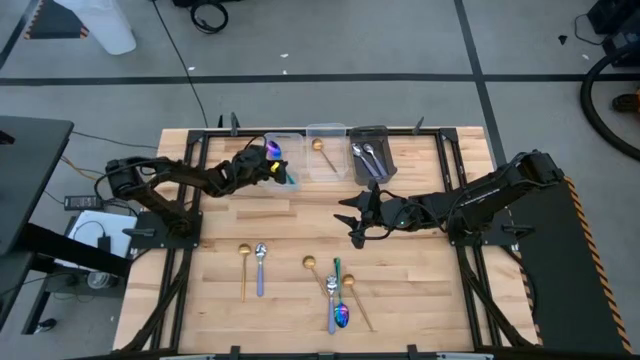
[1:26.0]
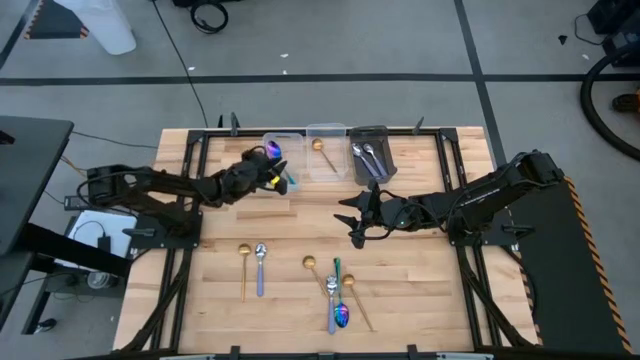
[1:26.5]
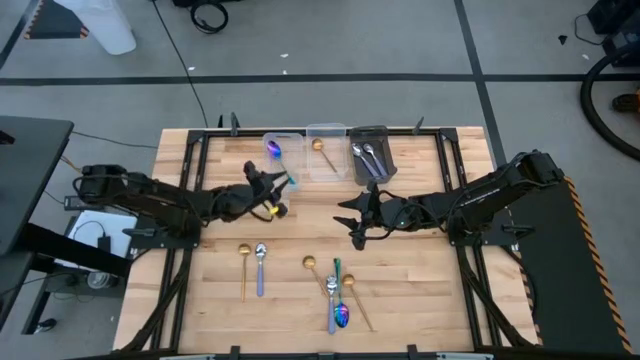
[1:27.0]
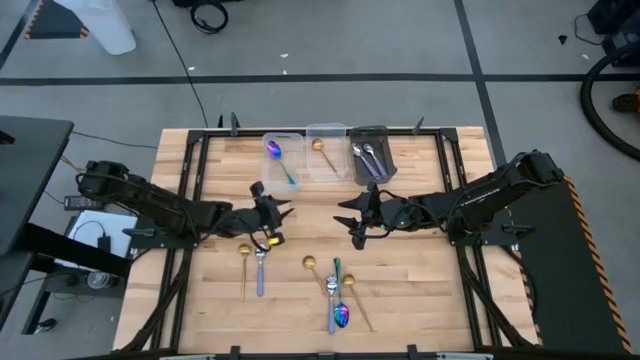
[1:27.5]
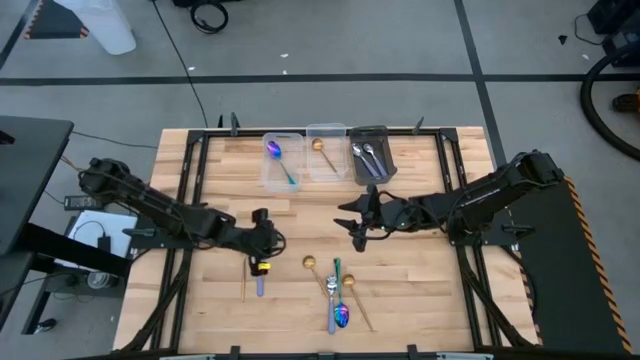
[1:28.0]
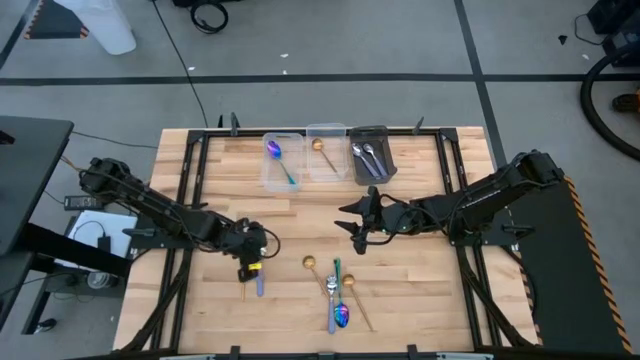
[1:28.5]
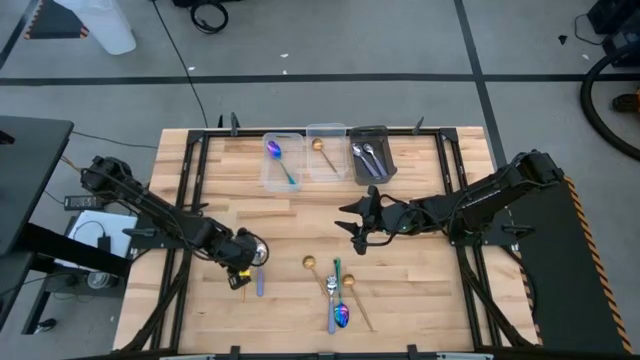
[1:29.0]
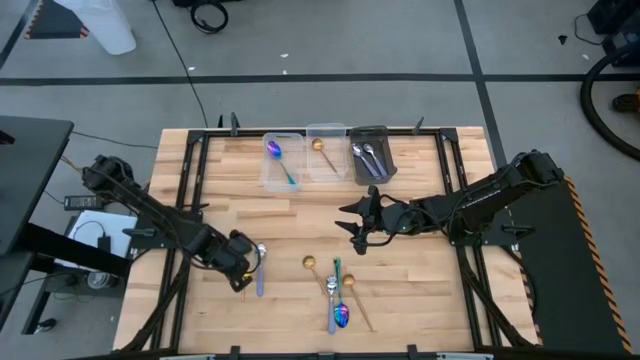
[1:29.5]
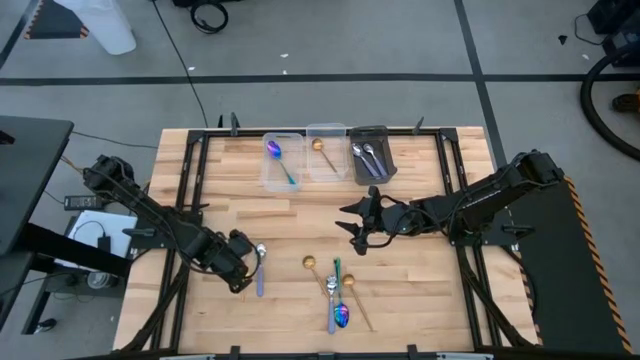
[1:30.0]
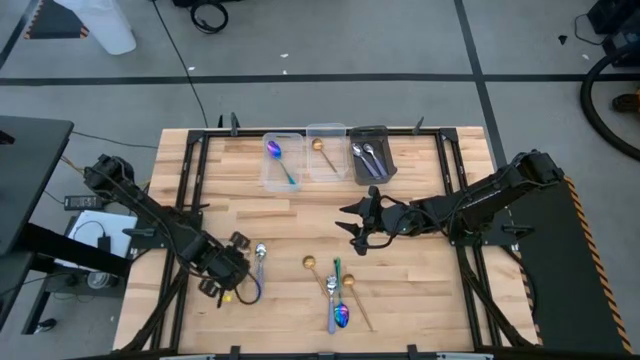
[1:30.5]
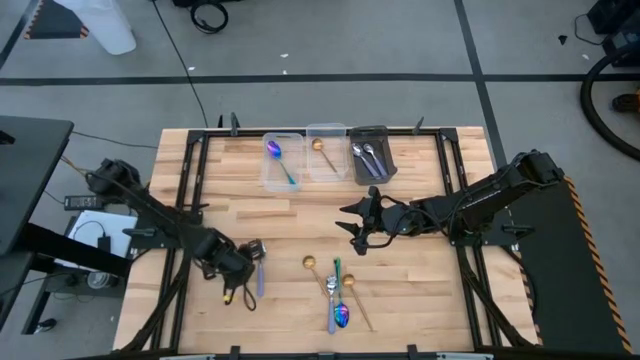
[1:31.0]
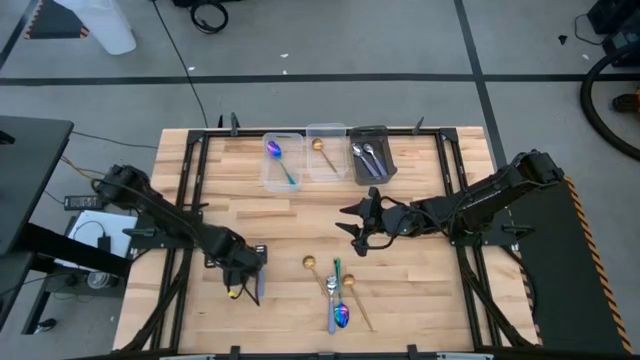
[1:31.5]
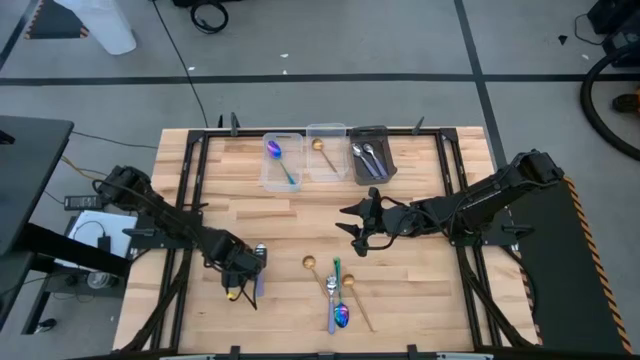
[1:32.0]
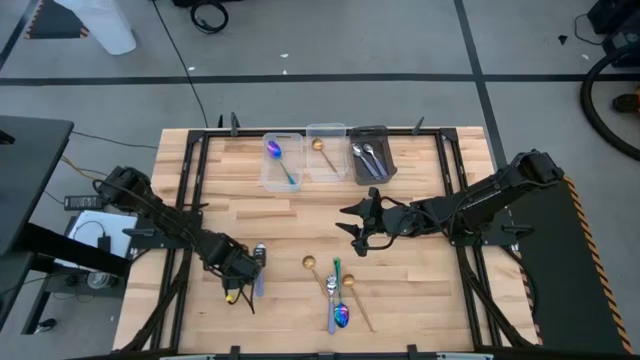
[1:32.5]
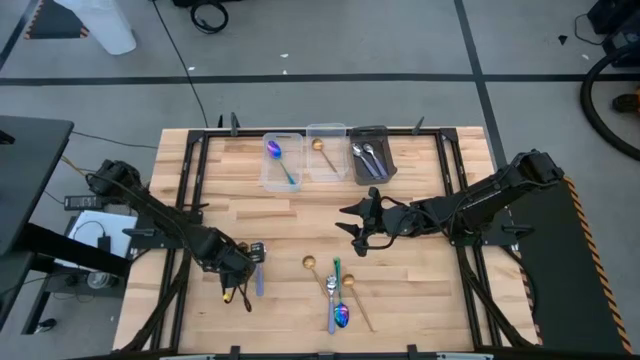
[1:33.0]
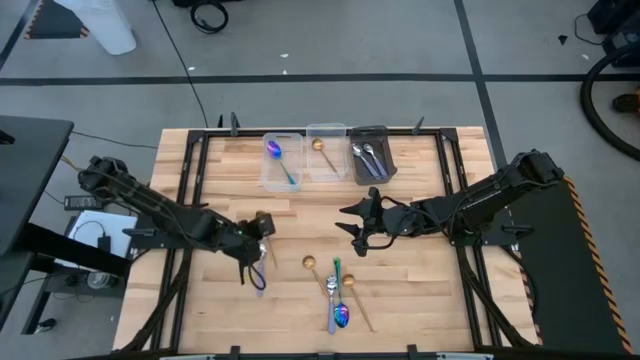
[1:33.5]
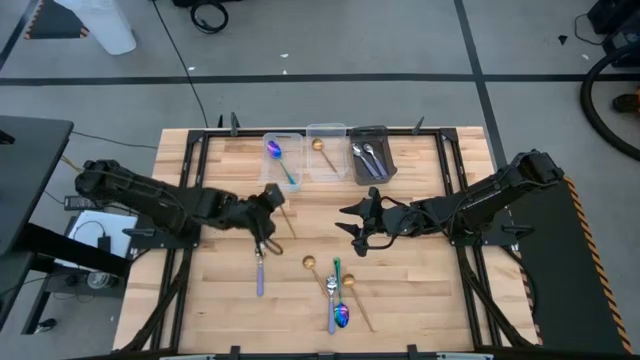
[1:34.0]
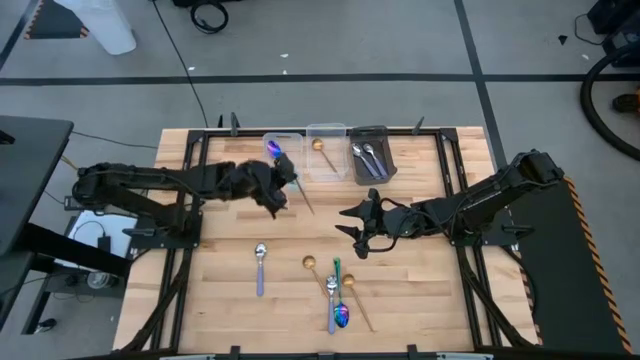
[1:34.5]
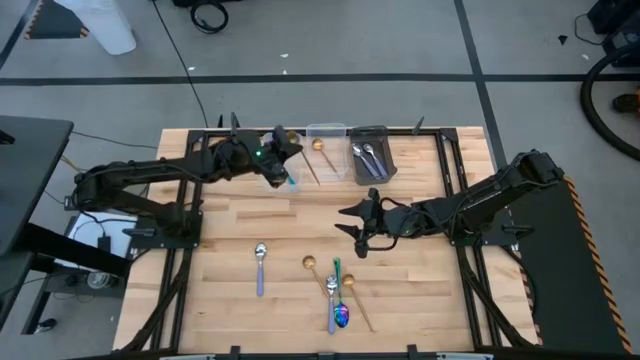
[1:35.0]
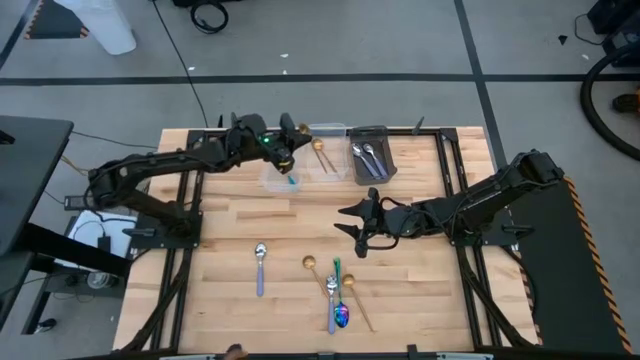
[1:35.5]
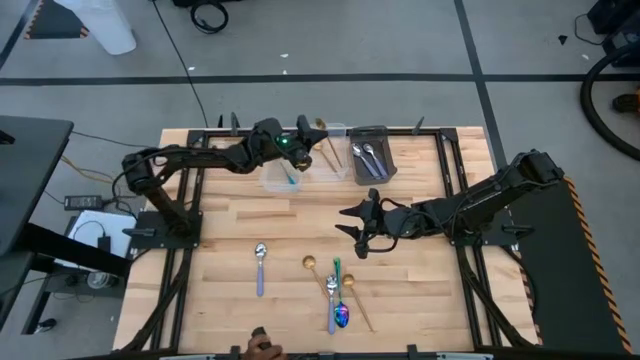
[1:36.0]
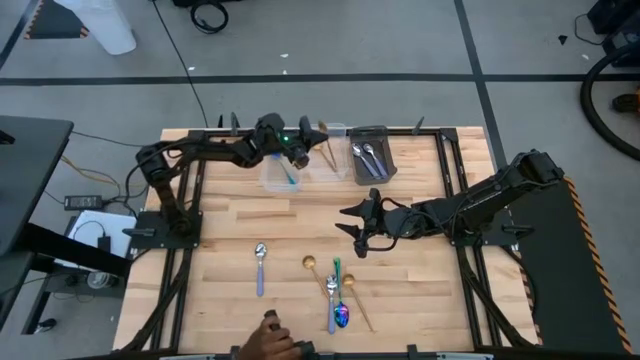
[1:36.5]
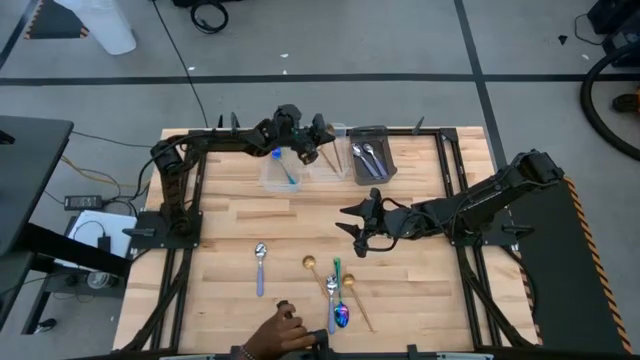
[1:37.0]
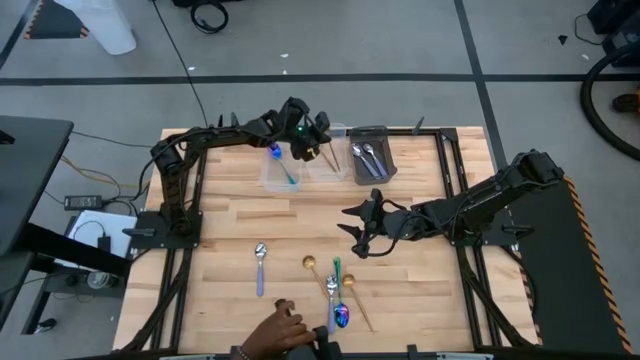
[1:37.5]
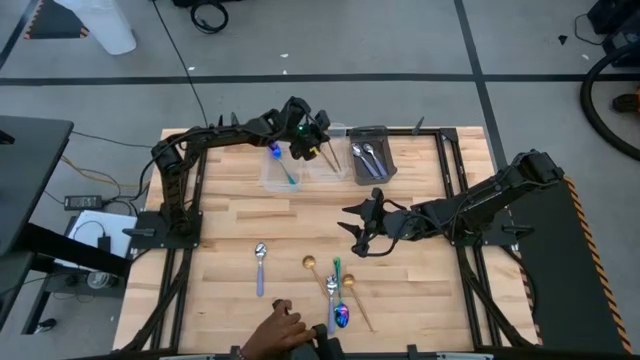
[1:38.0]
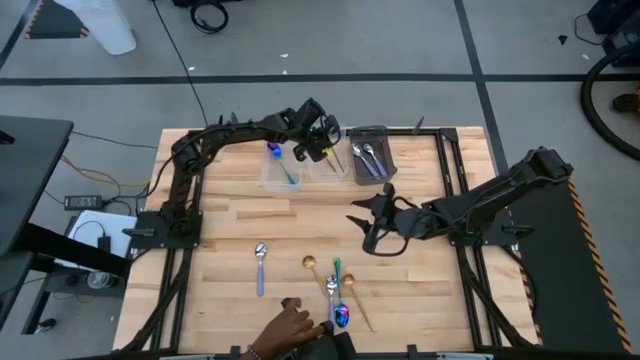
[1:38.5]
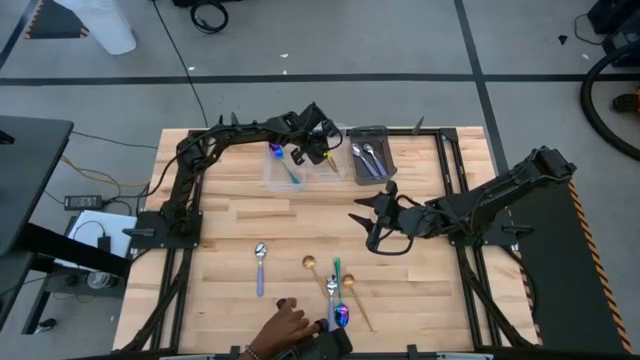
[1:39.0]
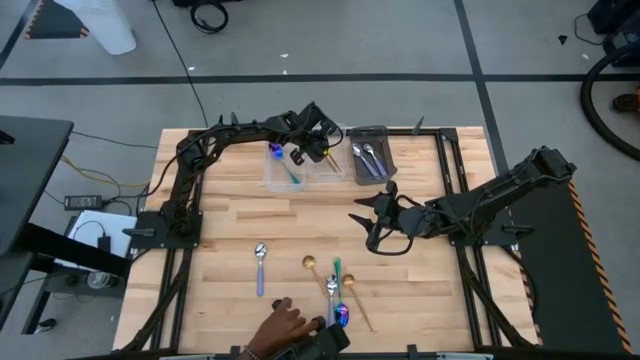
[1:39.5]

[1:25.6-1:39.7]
Task: Sort silverware by color (type)
Put the gold spoon into the right transparent bin

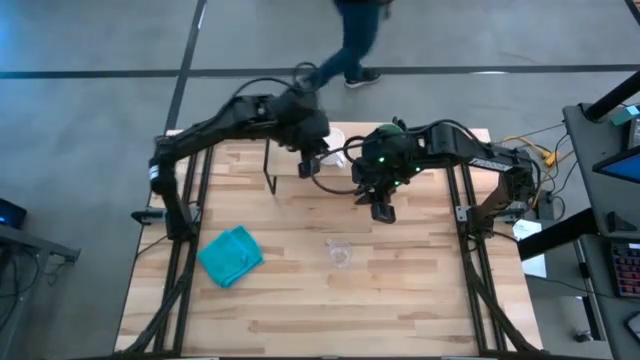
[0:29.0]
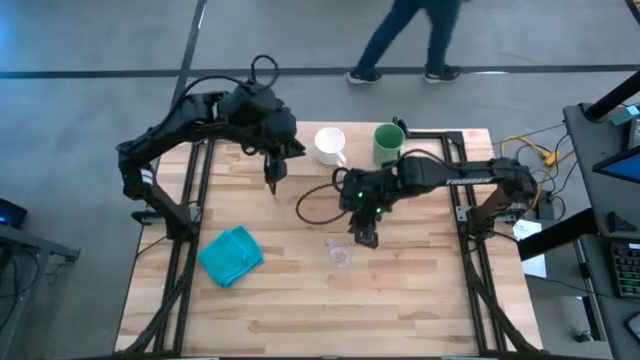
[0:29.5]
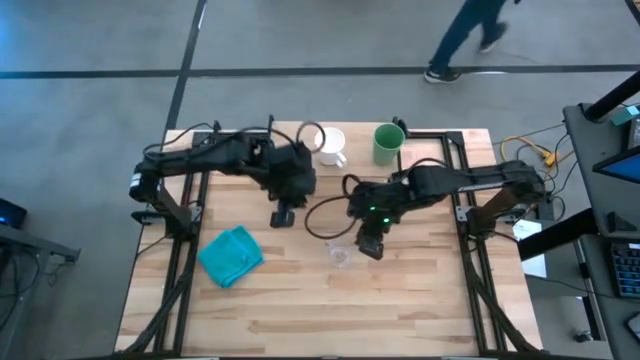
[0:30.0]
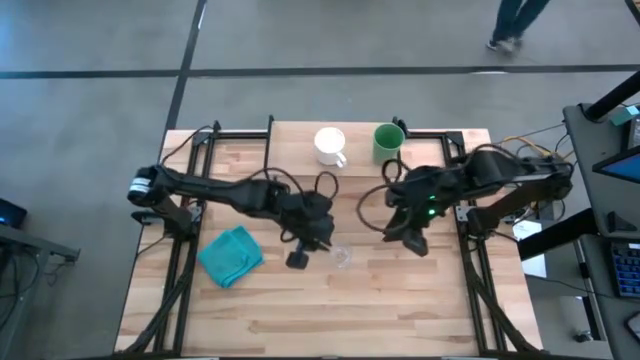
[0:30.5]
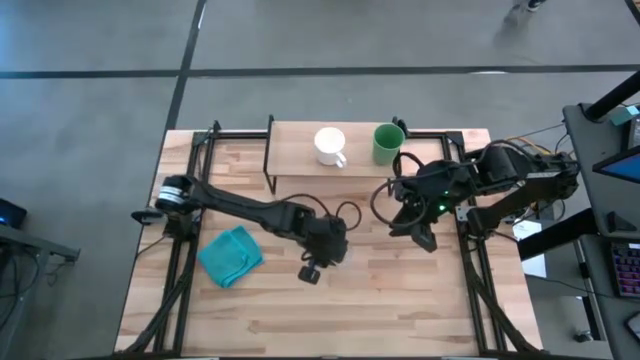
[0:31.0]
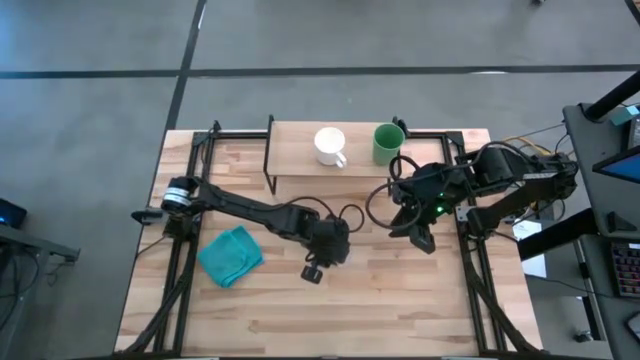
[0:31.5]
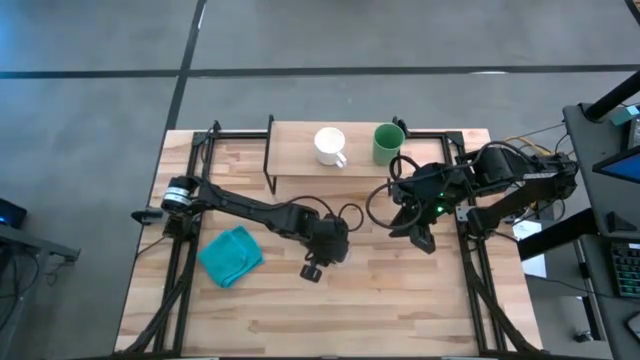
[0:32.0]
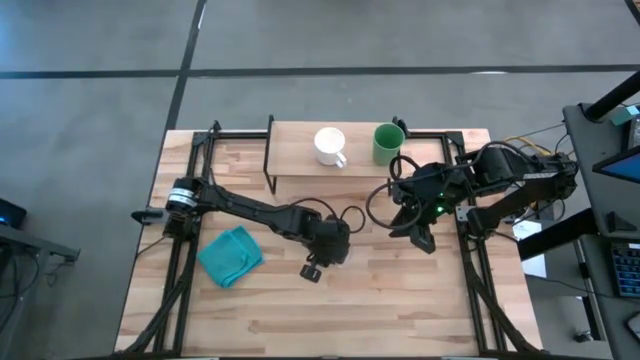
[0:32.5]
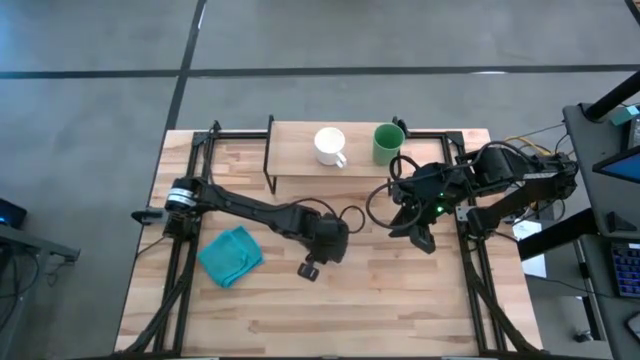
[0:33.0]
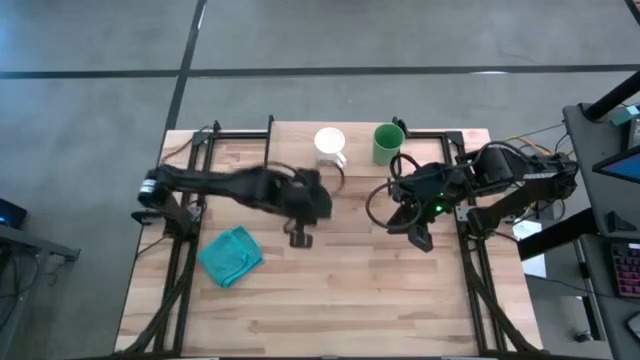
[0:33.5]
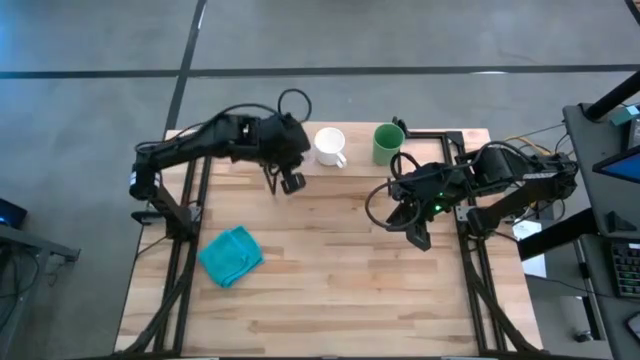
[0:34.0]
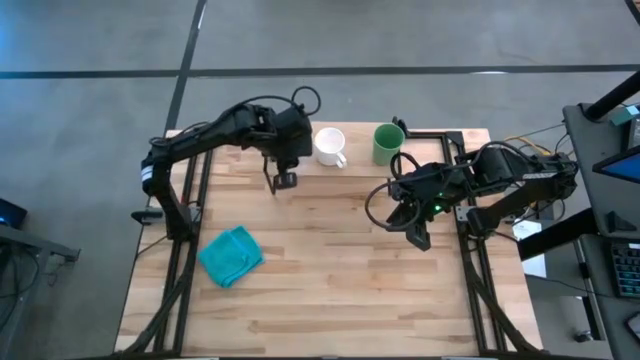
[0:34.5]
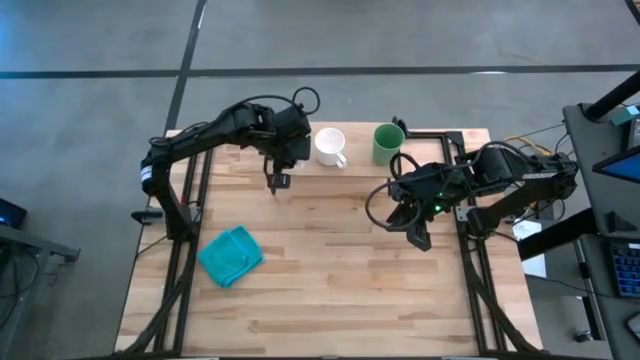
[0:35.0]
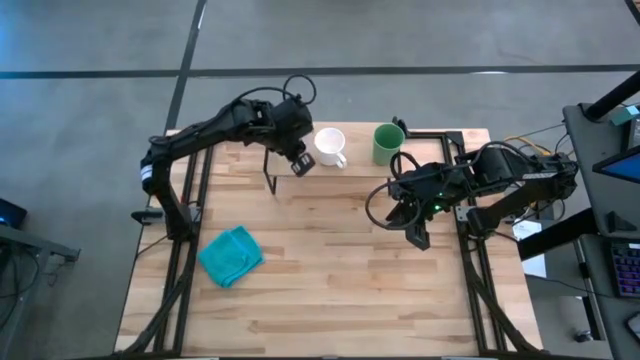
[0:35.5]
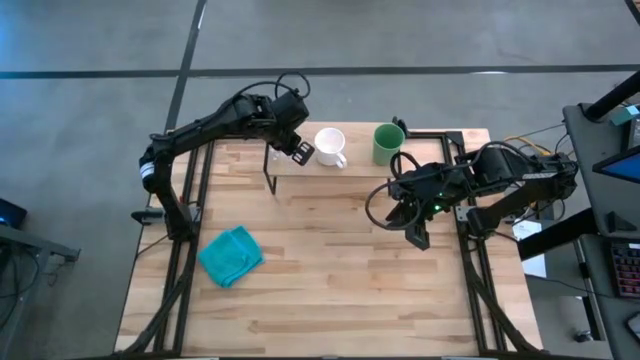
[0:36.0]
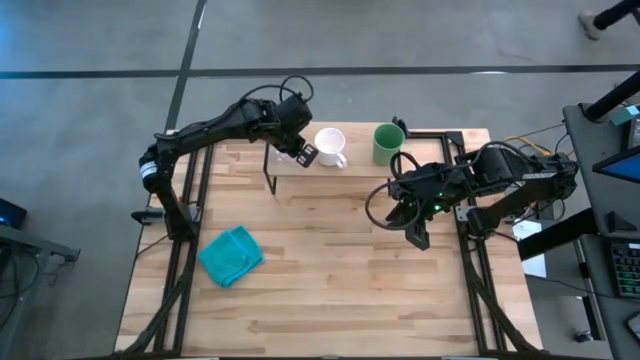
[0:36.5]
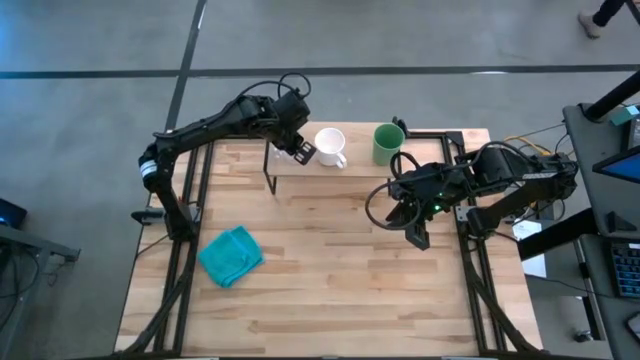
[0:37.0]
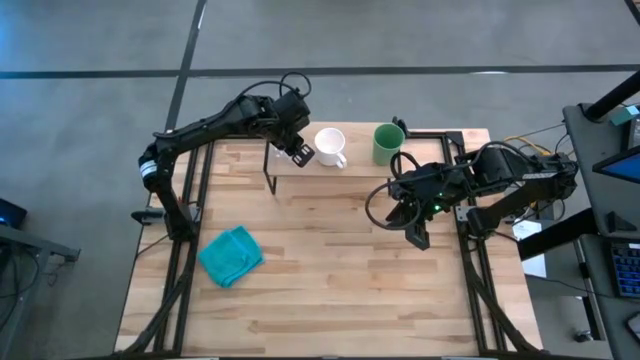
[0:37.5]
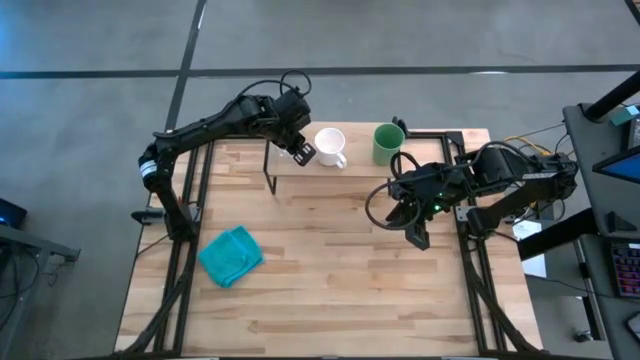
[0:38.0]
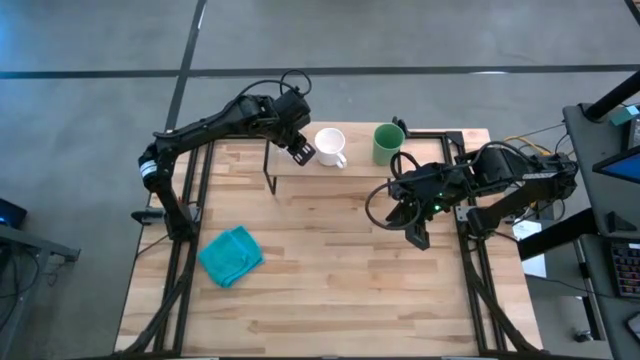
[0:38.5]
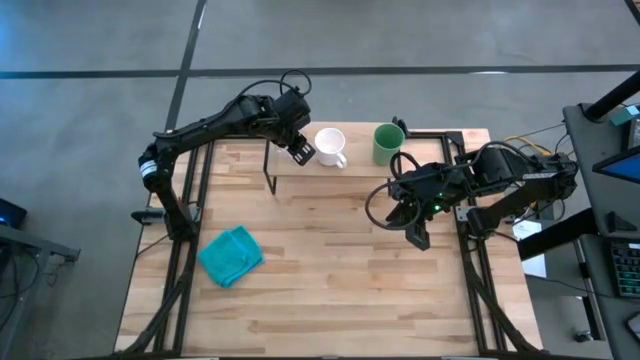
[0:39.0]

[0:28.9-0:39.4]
Task: Stack small to large cups/mugs on shelf
Put the transparent mug on the shelf
